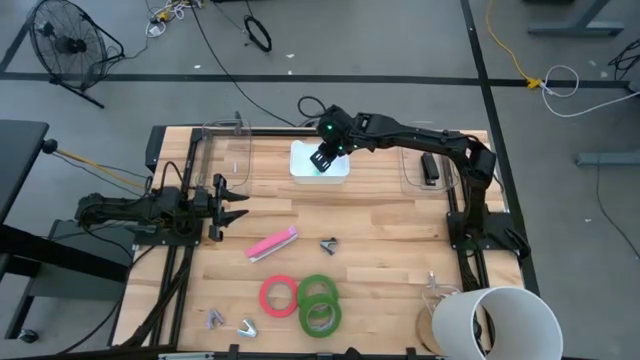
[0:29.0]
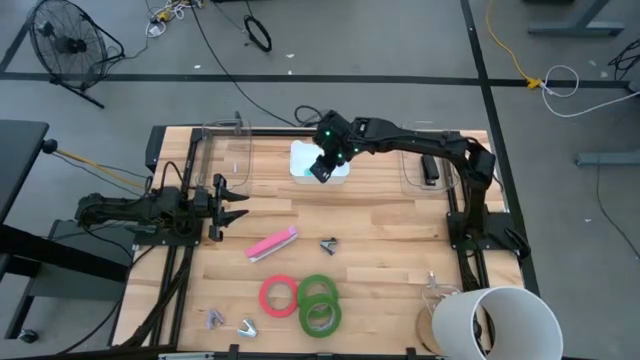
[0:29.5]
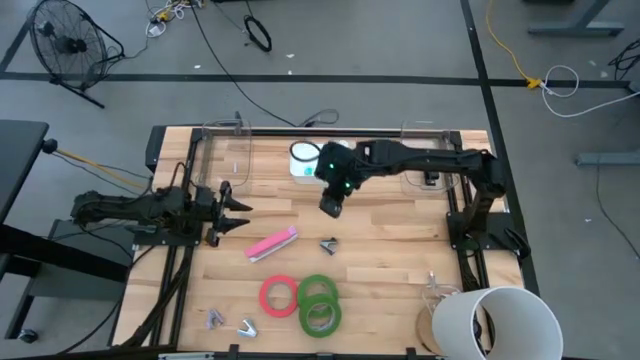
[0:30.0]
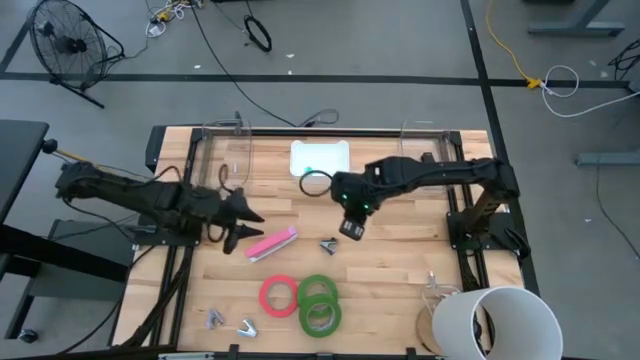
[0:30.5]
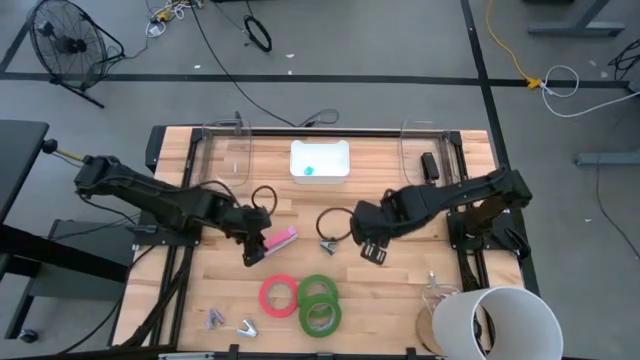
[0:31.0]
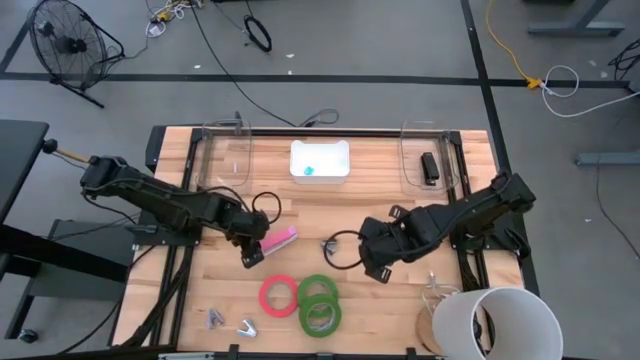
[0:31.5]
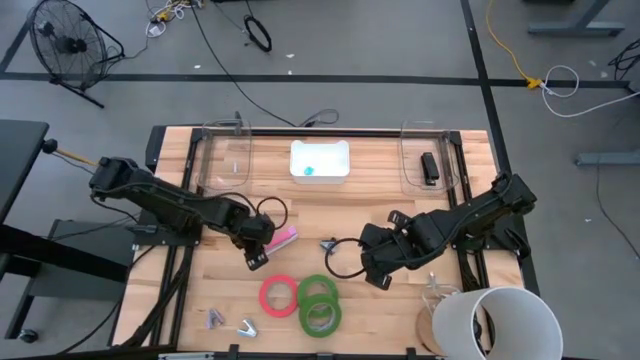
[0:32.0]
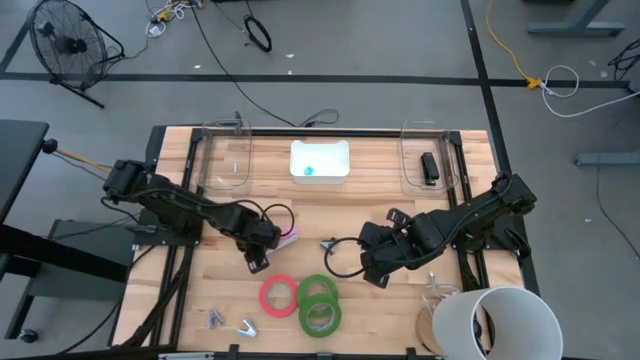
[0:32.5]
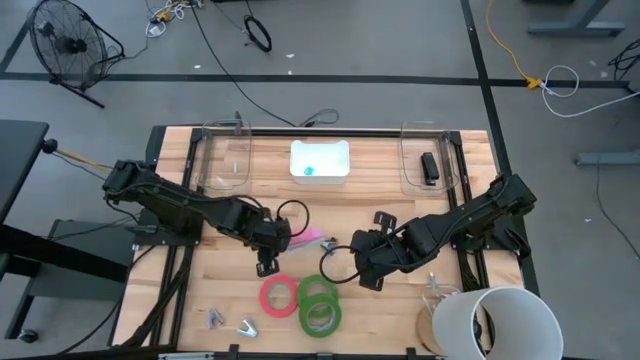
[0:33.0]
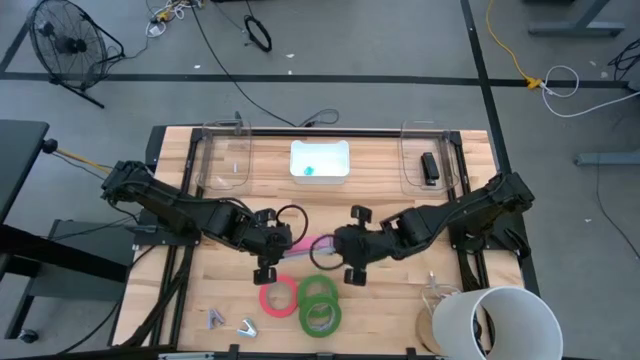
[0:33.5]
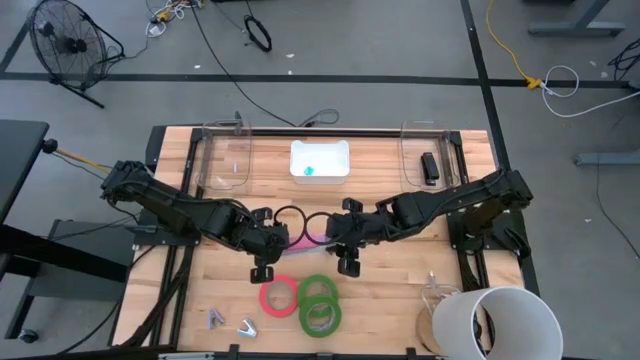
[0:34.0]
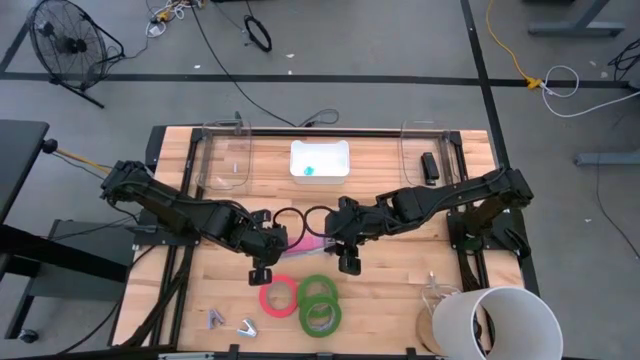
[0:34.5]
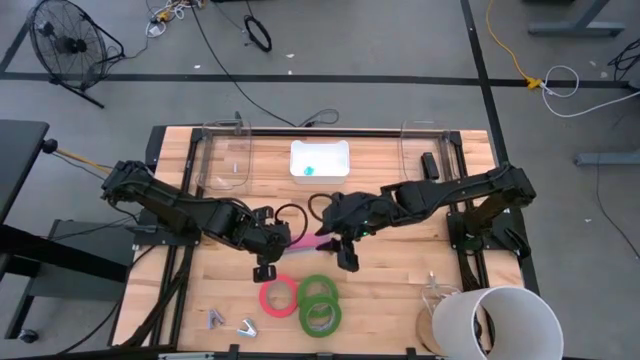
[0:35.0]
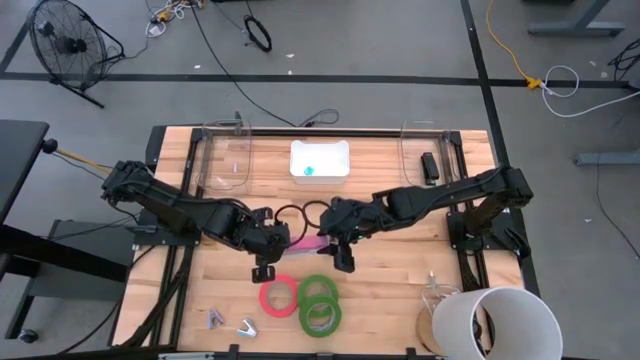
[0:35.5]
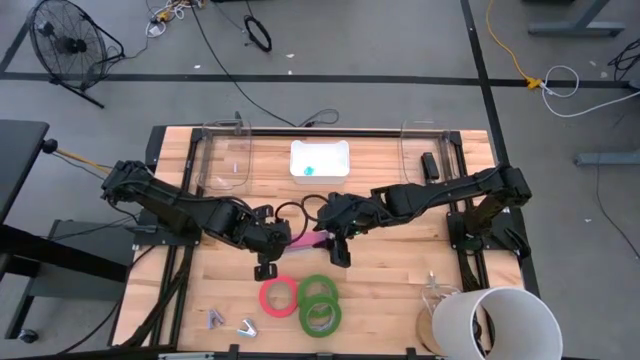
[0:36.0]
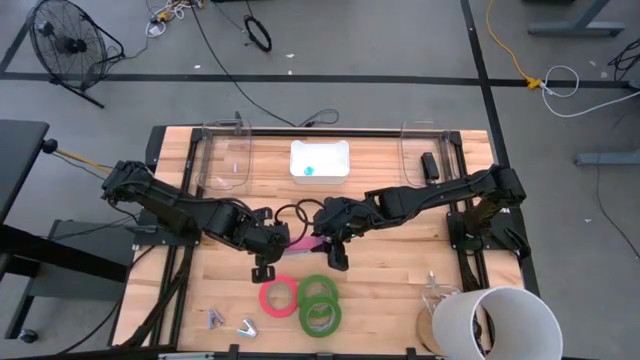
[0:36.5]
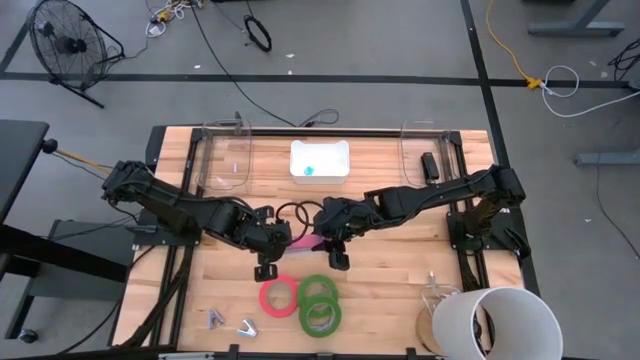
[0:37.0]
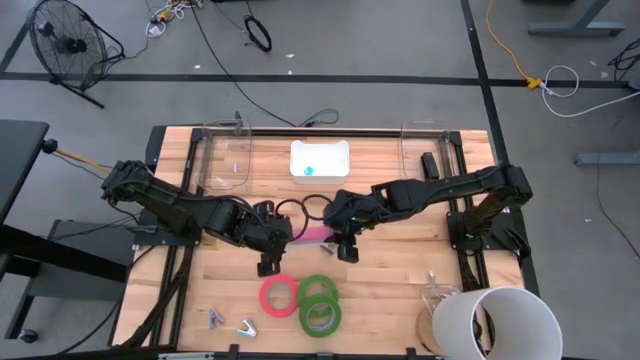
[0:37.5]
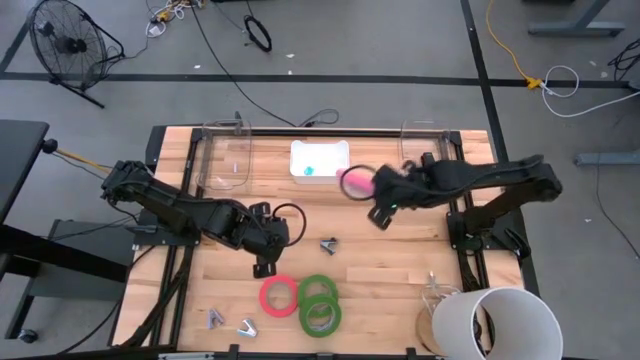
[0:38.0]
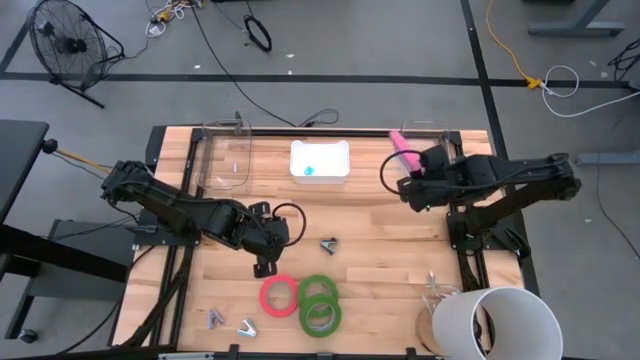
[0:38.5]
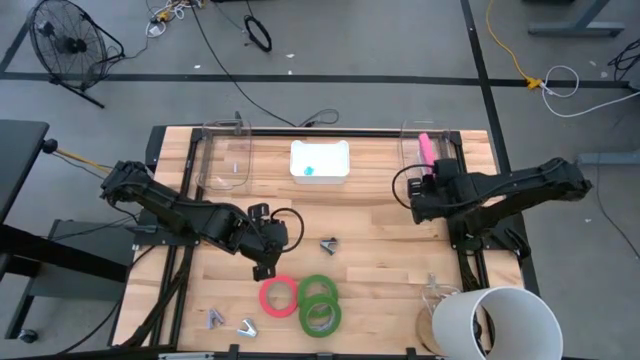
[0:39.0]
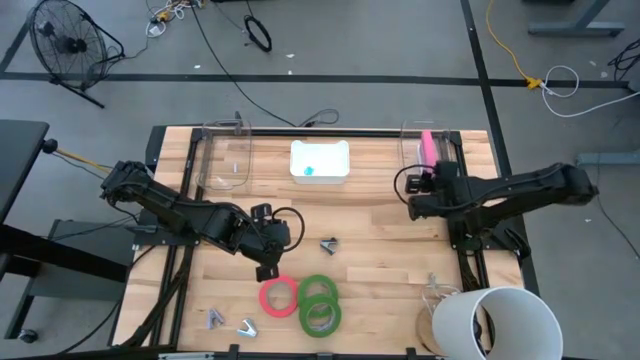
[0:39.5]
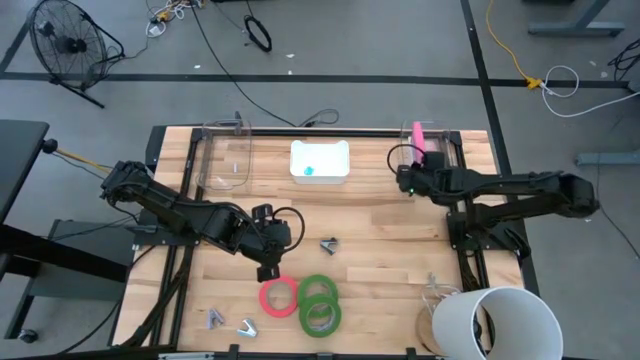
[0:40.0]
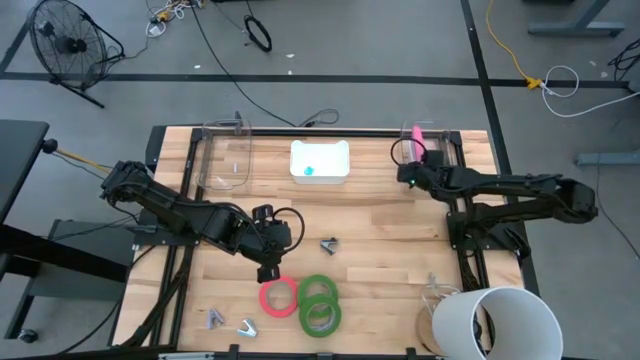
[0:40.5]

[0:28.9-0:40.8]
Task: Pick and place Stapler, Stapler remover, tape
Put the pink stapler into the right transparent bin

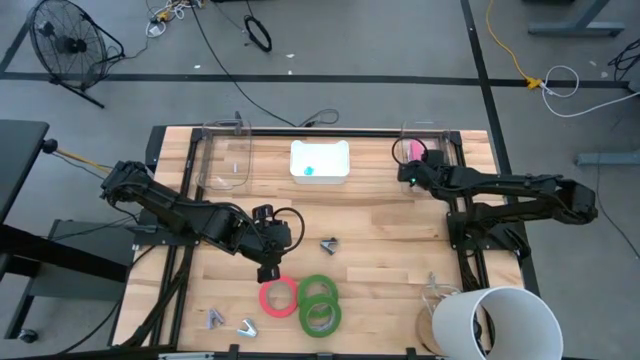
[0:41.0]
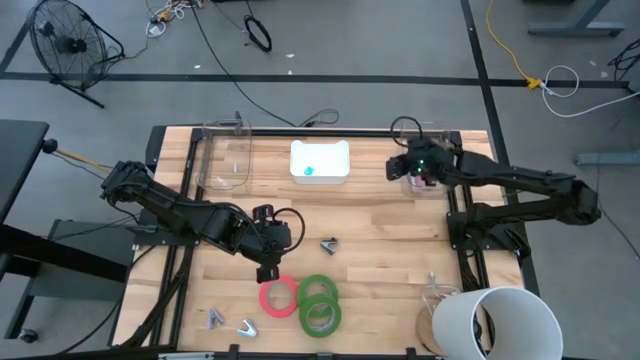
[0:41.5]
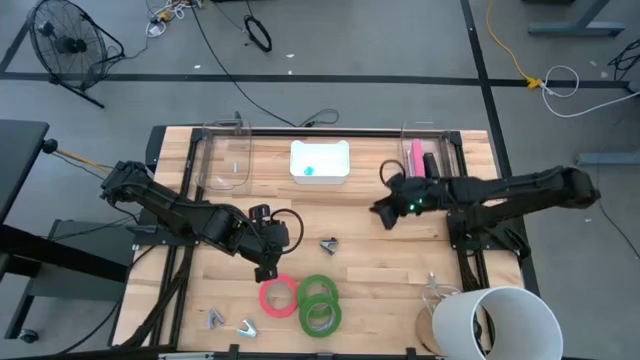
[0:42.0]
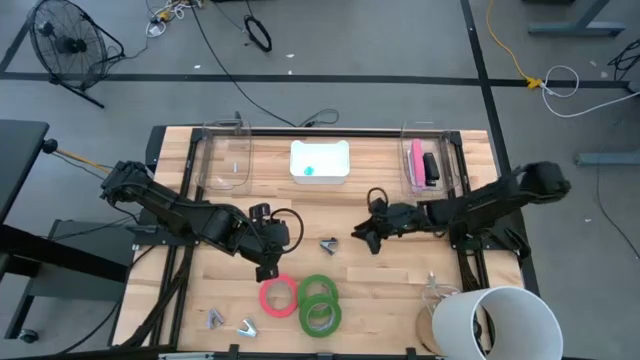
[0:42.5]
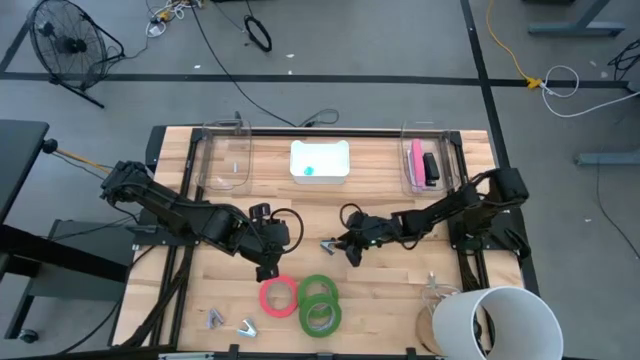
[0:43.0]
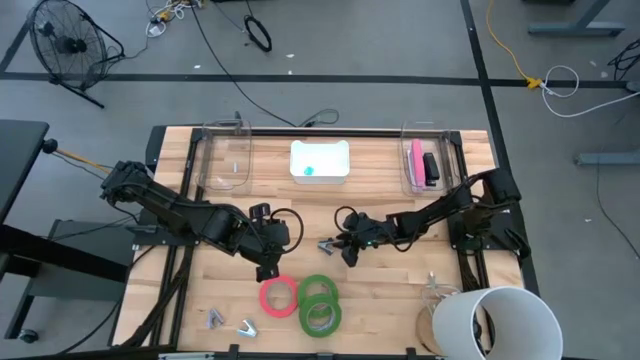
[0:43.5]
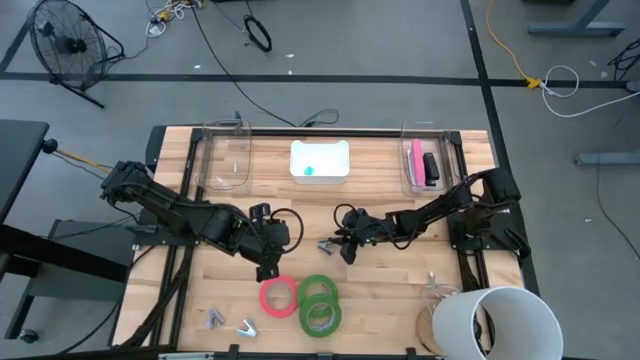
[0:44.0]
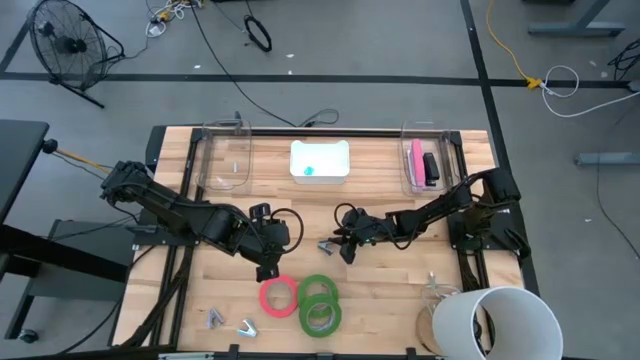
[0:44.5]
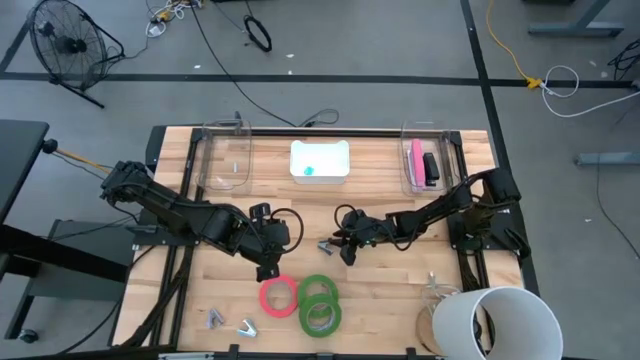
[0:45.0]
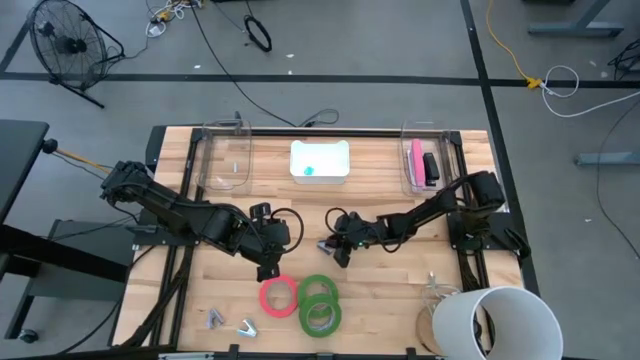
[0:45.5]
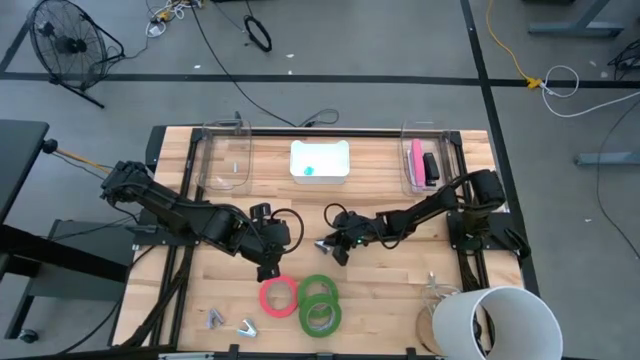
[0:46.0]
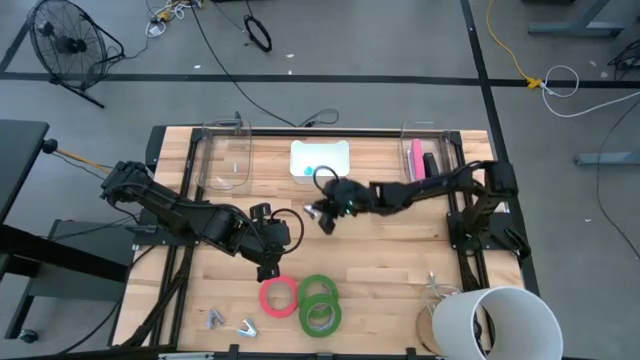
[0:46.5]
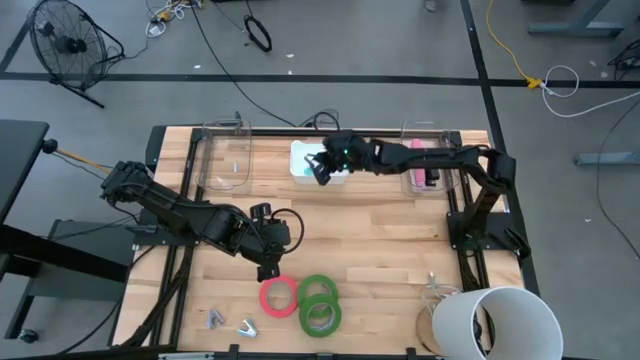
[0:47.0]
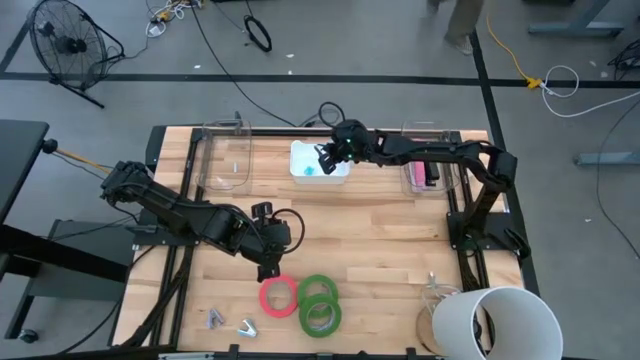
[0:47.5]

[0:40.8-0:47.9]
Put the black staple remover into the white bin
